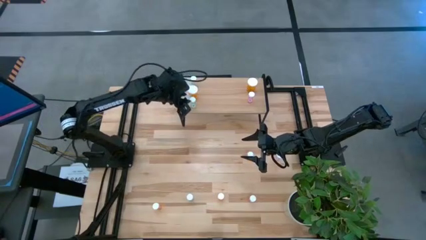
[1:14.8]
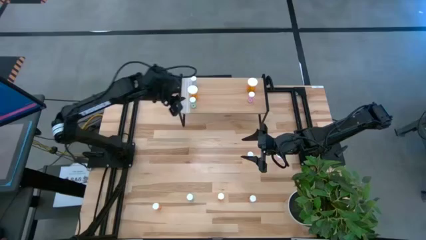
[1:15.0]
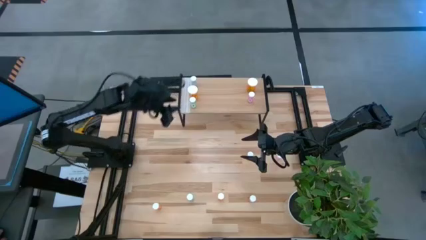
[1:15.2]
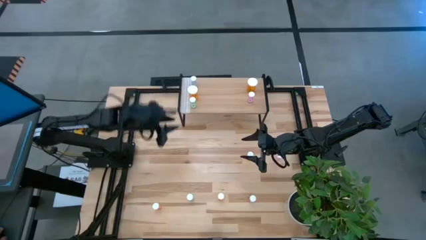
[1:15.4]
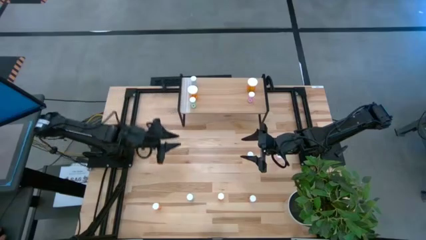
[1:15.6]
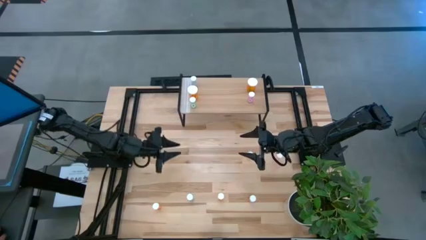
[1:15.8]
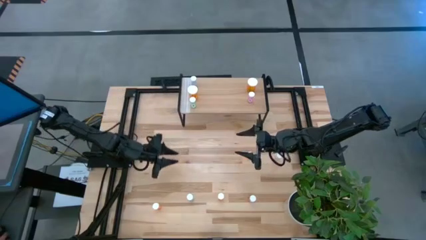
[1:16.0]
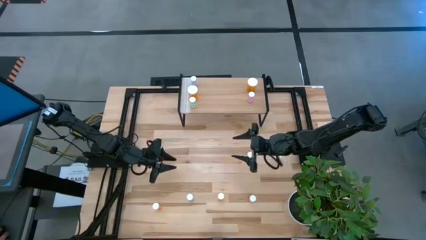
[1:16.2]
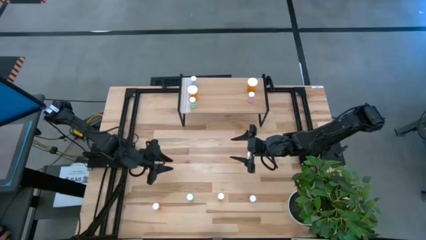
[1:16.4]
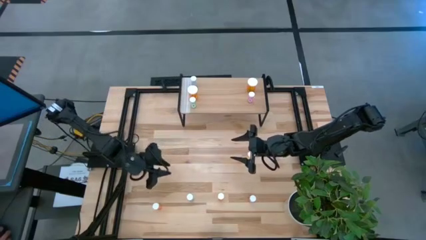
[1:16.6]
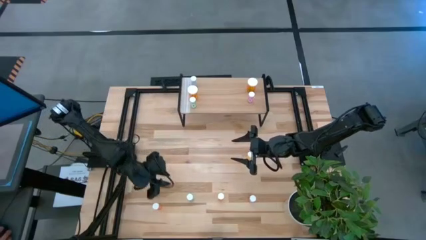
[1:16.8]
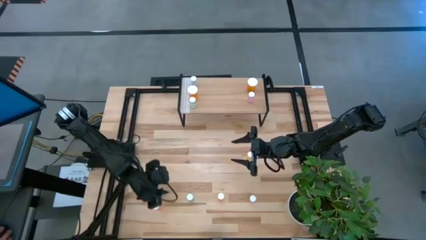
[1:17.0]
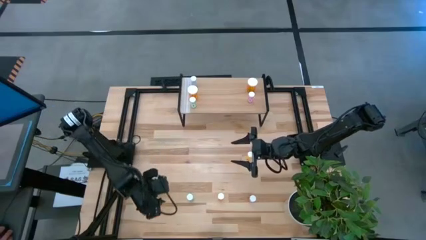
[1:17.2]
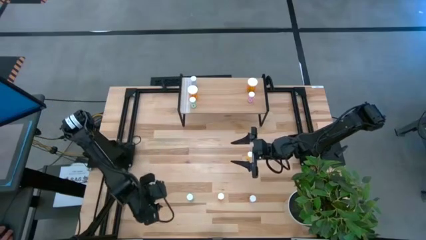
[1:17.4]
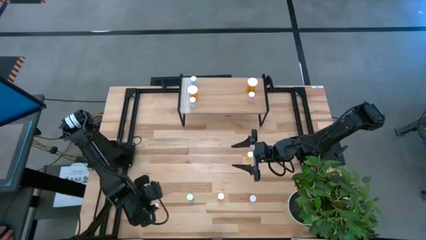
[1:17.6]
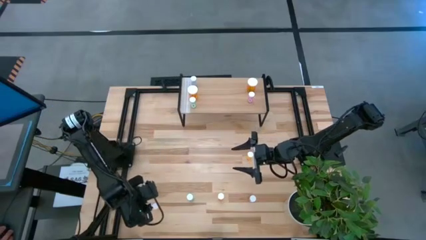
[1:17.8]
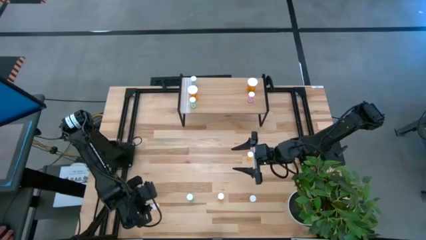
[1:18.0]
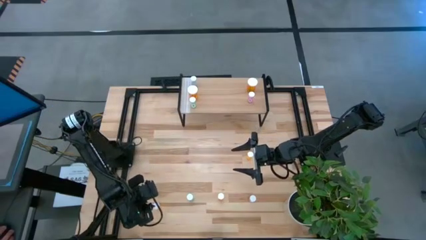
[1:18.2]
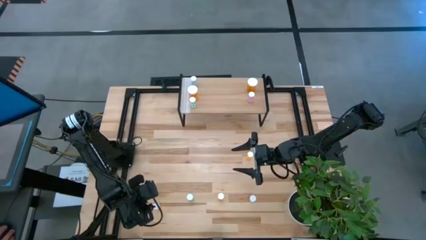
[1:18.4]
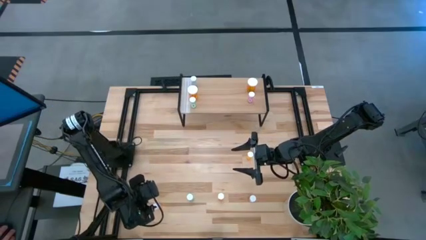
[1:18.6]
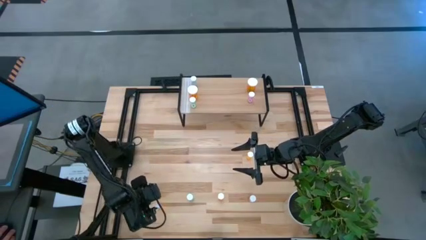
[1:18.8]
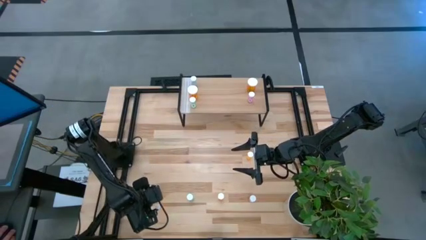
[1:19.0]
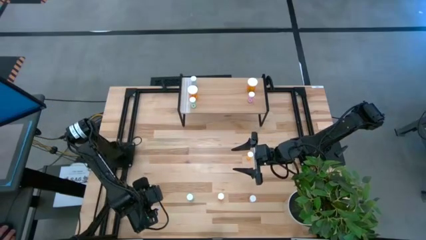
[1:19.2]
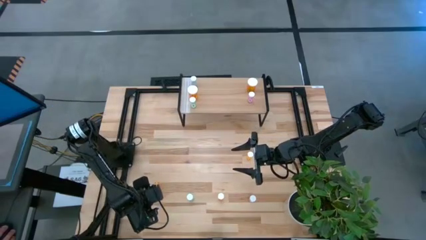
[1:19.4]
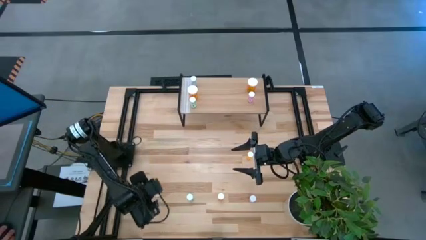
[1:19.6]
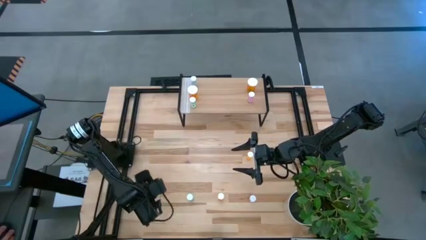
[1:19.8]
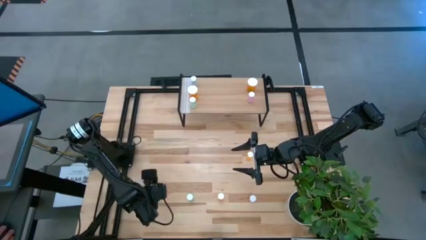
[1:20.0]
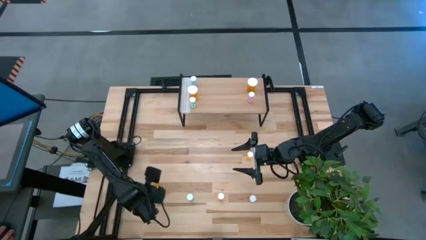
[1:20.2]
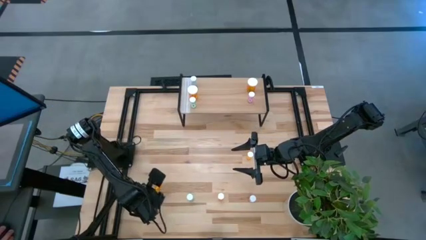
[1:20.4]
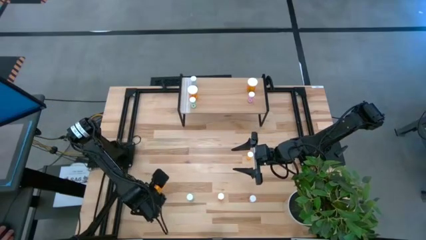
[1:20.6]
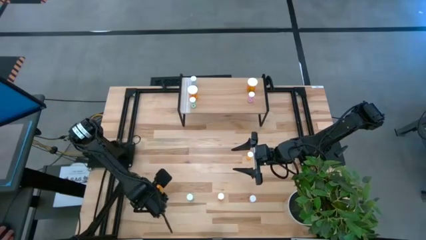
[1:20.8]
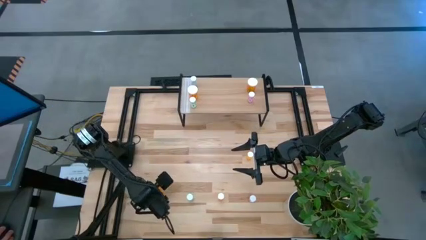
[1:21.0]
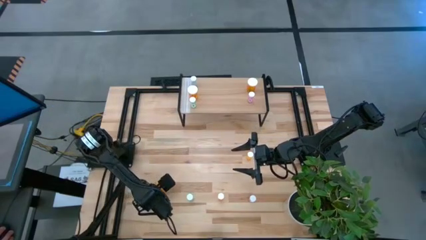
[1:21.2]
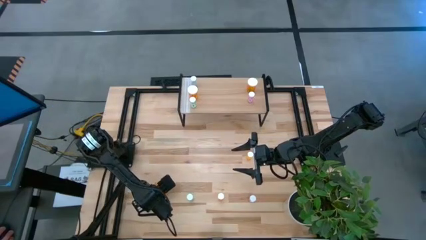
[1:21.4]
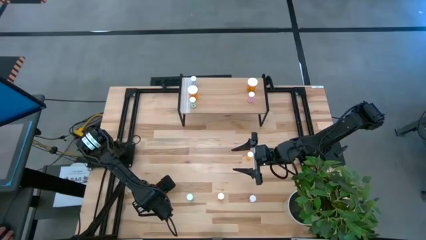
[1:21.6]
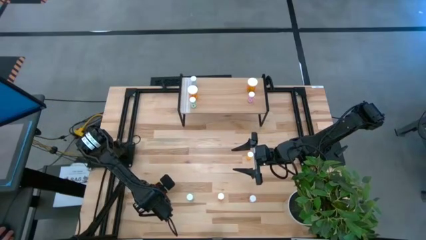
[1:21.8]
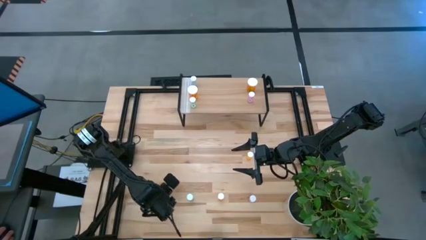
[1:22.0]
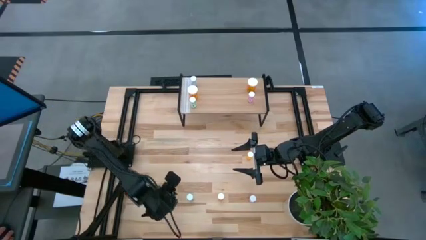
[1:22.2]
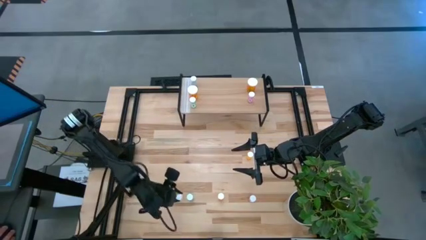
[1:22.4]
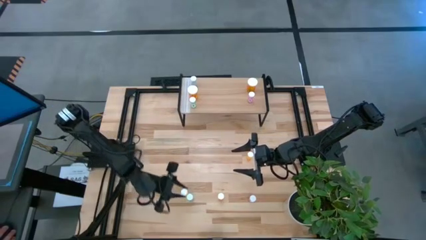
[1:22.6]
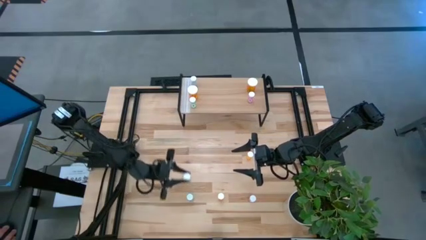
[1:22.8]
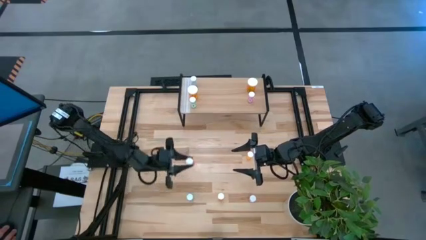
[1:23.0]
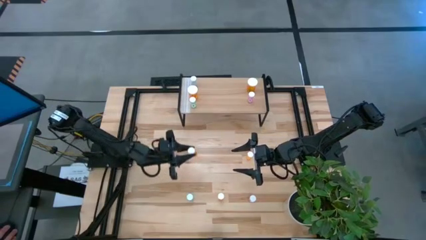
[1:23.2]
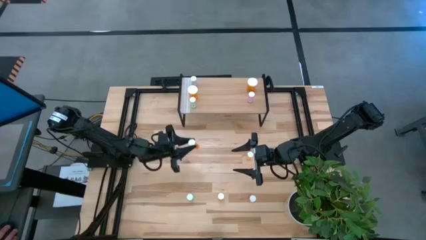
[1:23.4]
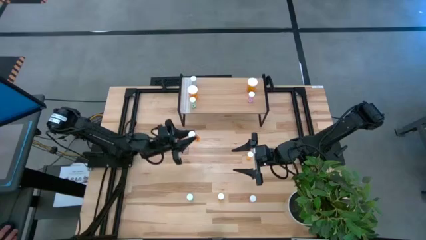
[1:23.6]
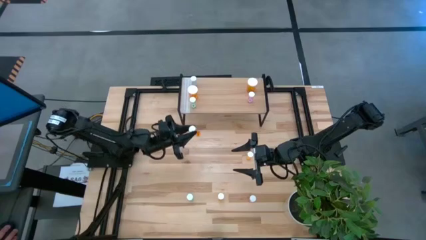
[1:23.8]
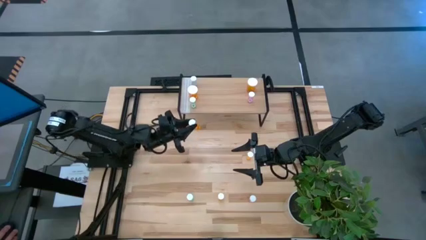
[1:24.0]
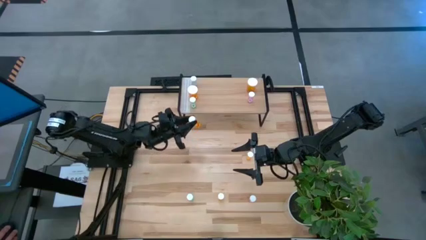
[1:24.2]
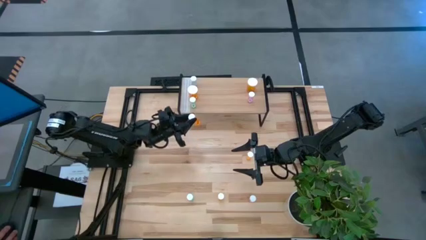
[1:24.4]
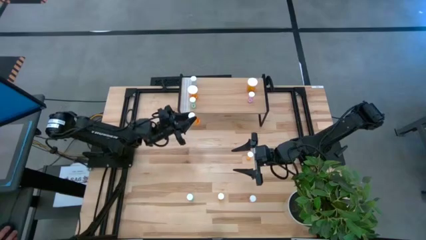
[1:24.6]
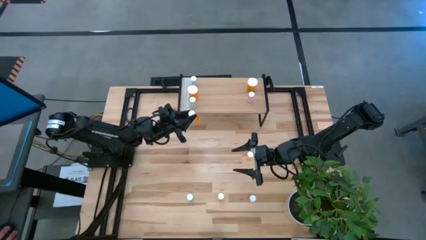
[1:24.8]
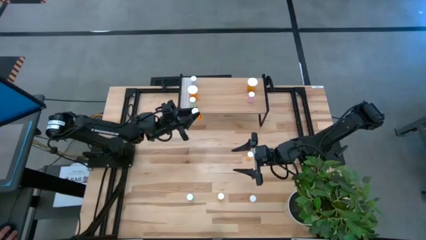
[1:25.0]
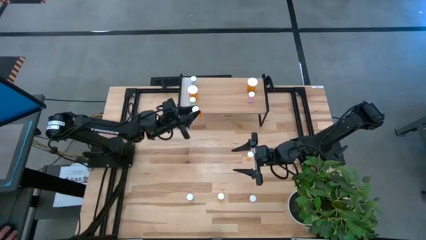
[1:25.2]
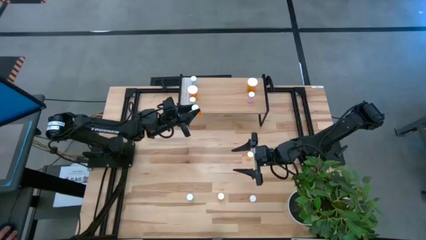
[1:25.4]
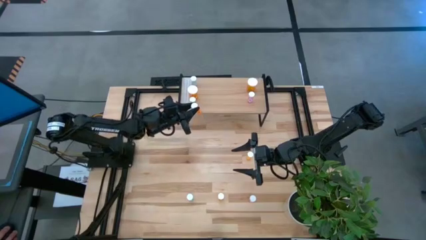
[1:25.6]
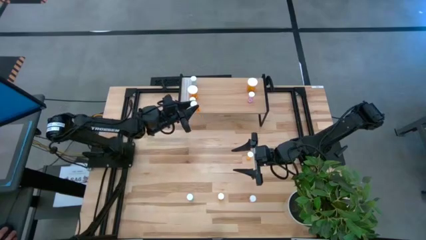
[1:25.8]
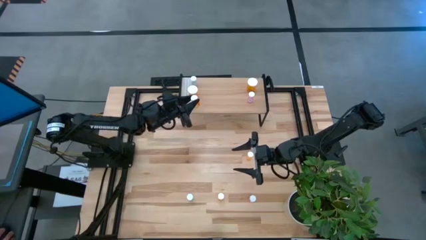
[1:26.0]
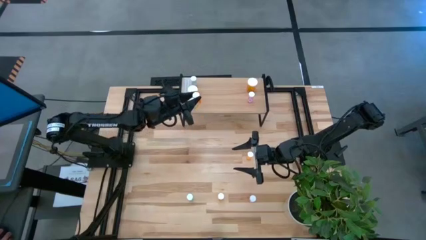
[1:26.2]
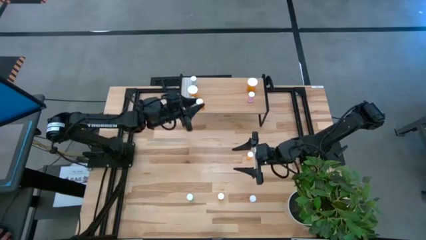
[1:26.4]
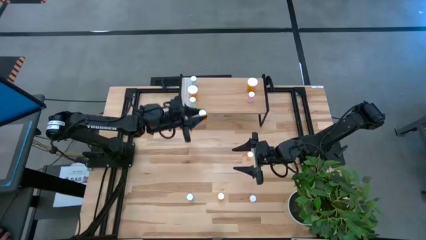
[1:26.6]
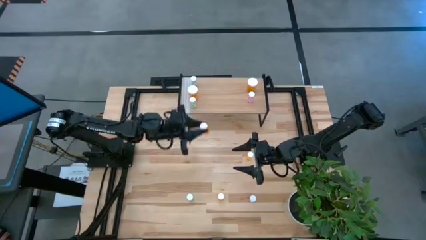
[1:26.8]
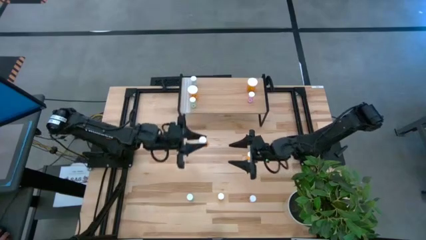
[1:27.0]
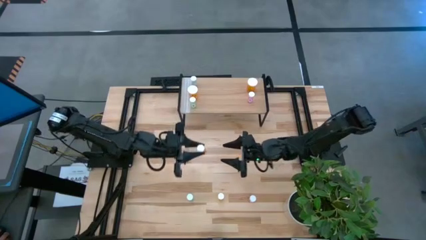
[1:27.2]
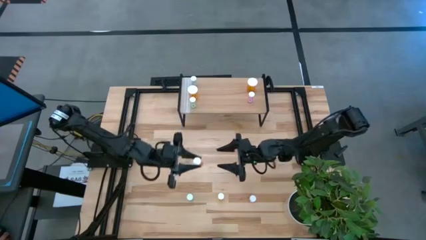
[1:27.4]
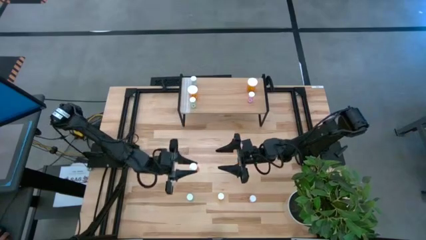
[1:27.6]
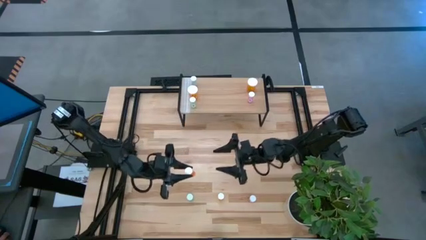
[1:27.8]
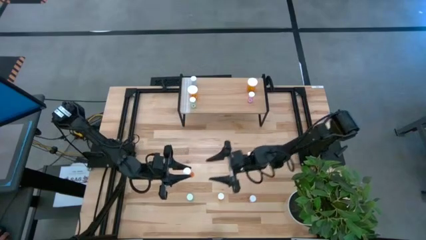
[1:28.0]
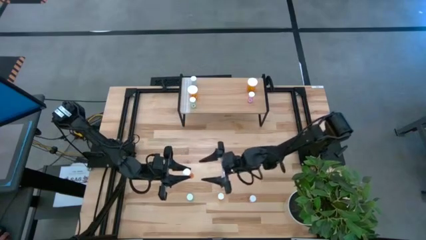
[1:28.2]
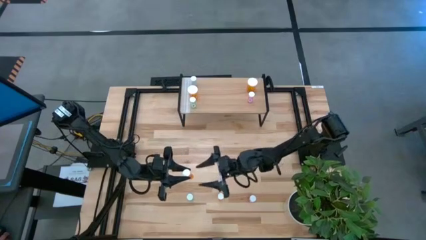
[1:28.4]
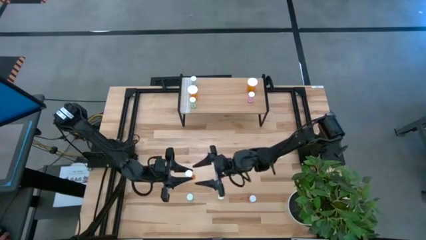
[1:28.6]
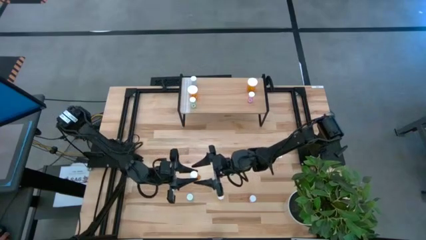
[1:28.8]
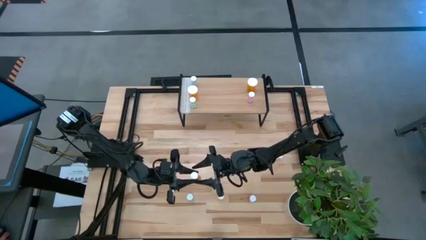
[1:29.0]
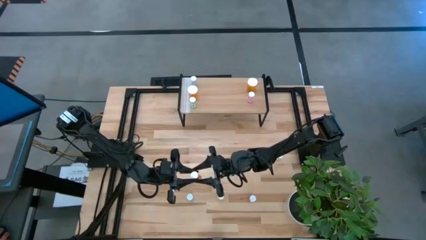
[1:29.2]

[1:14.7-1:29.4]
Task: Pick and place medicine bottles onto shelf by color
Put the bottom left small orange pill bottle on the shelf
